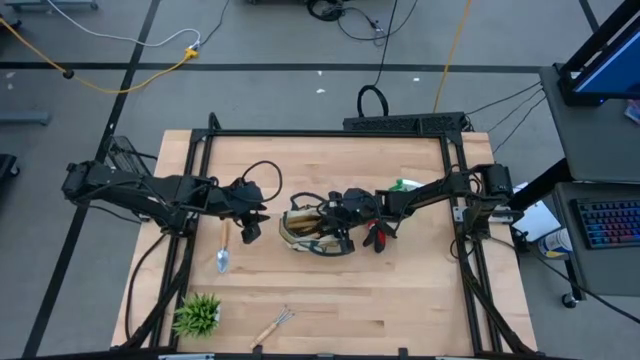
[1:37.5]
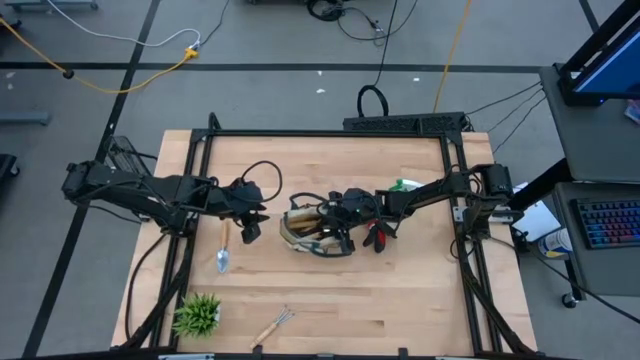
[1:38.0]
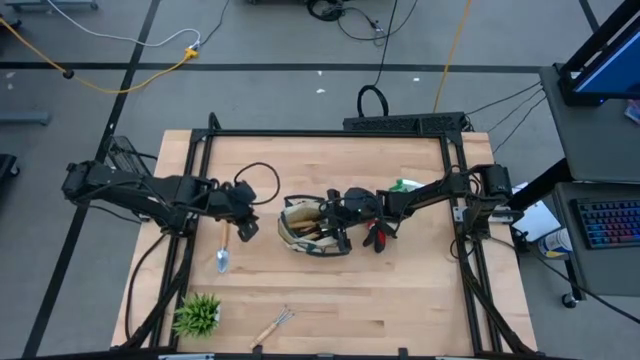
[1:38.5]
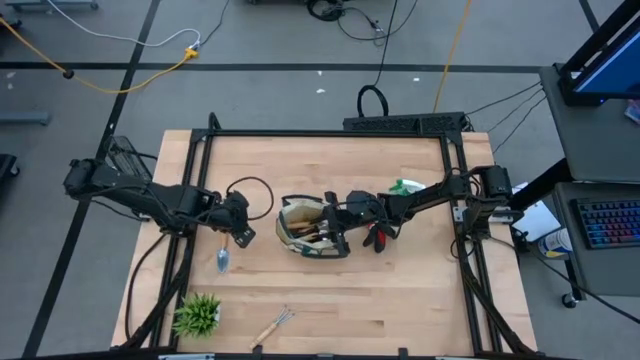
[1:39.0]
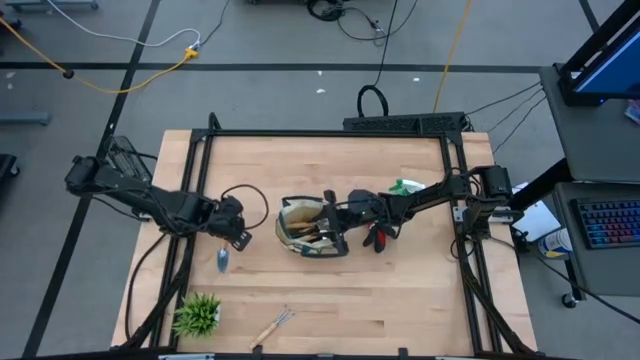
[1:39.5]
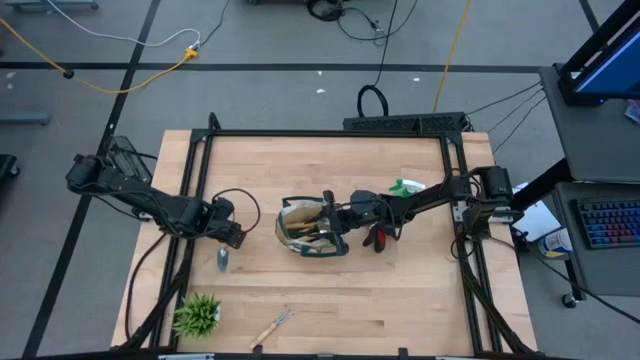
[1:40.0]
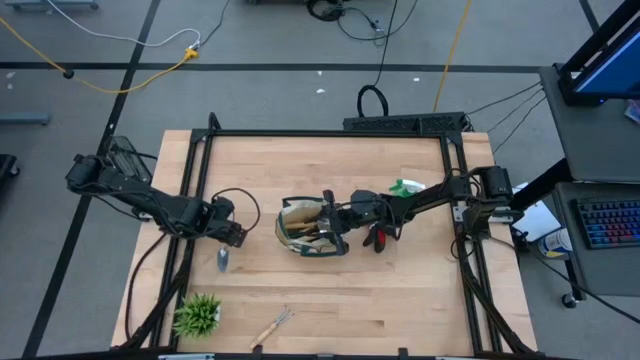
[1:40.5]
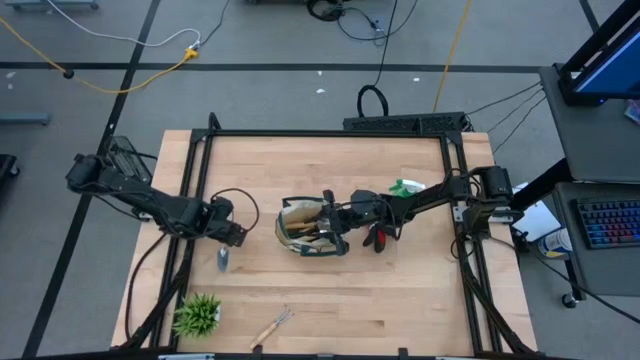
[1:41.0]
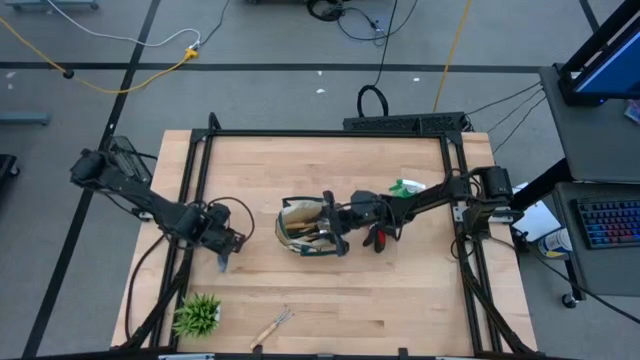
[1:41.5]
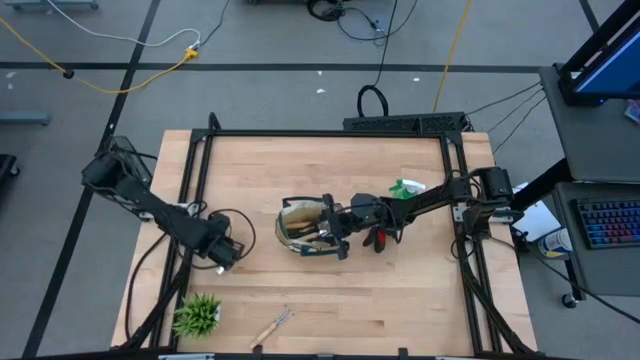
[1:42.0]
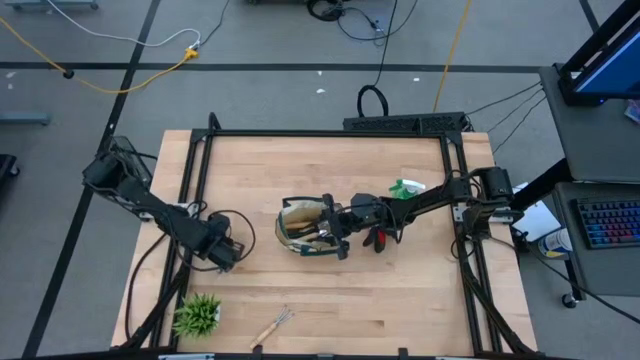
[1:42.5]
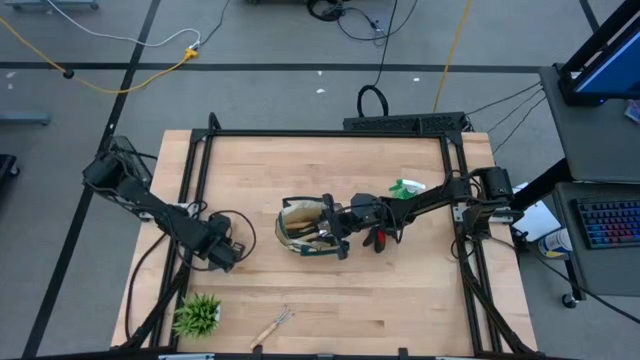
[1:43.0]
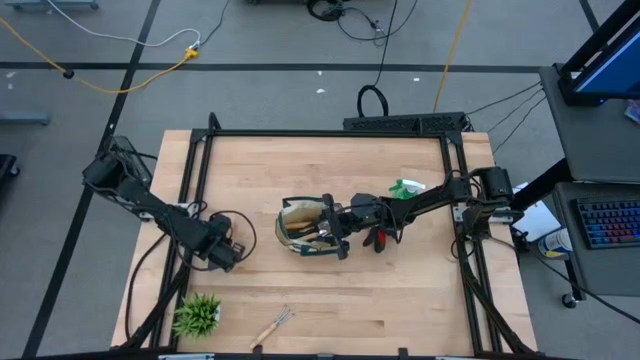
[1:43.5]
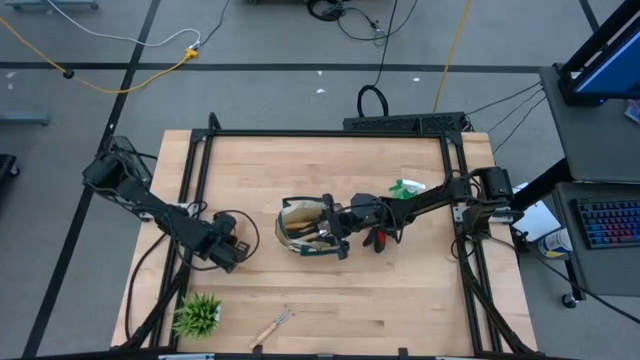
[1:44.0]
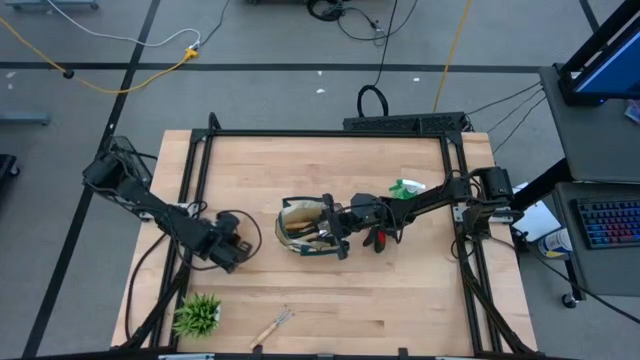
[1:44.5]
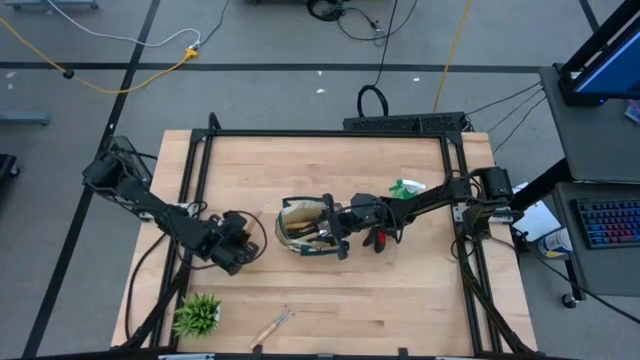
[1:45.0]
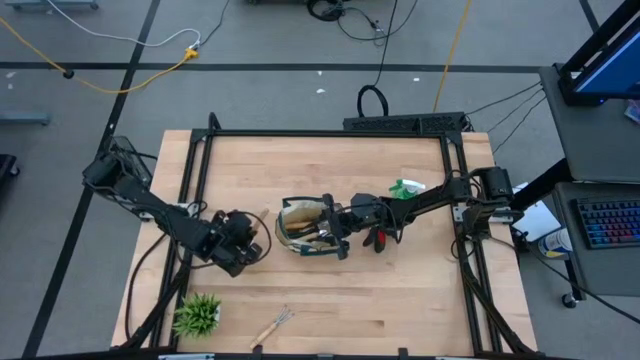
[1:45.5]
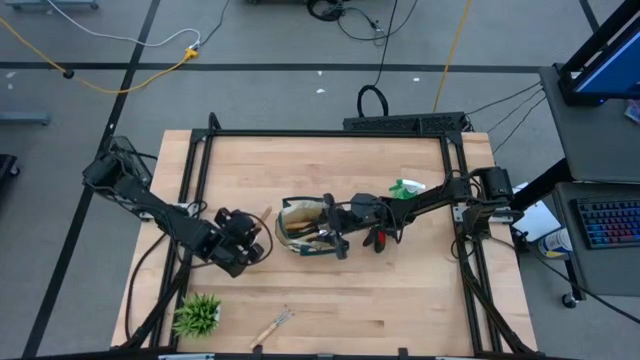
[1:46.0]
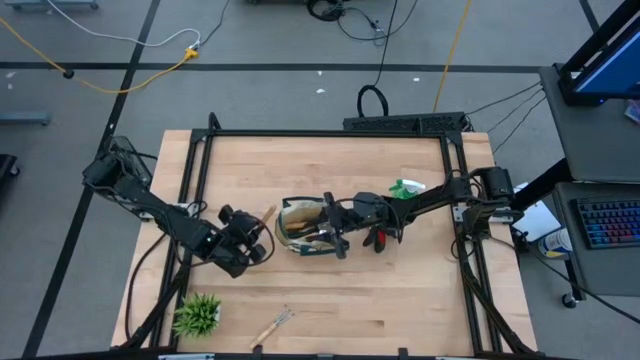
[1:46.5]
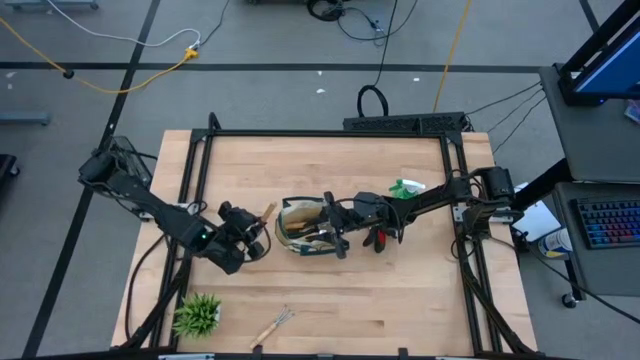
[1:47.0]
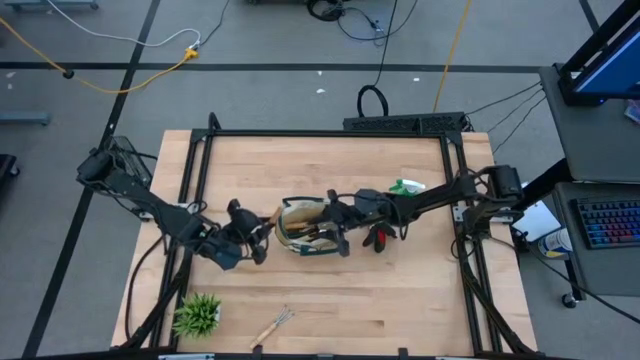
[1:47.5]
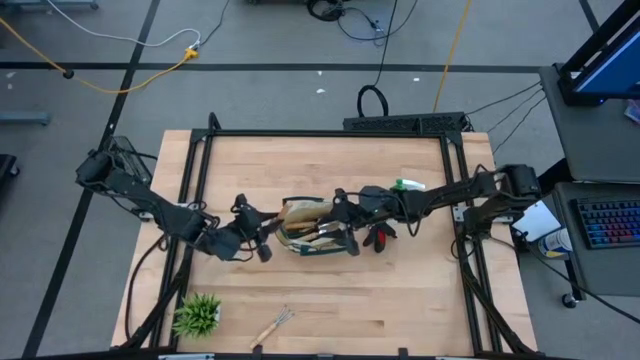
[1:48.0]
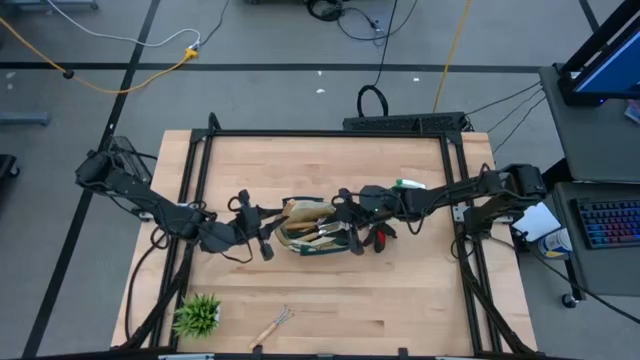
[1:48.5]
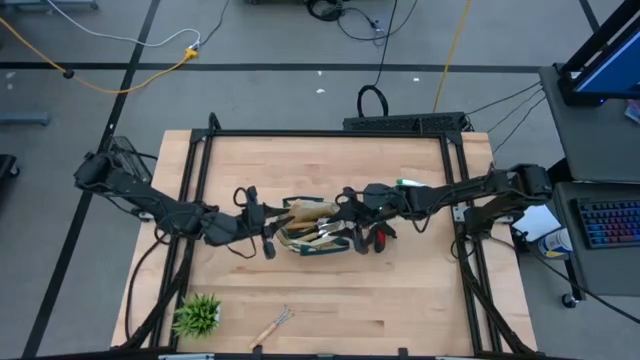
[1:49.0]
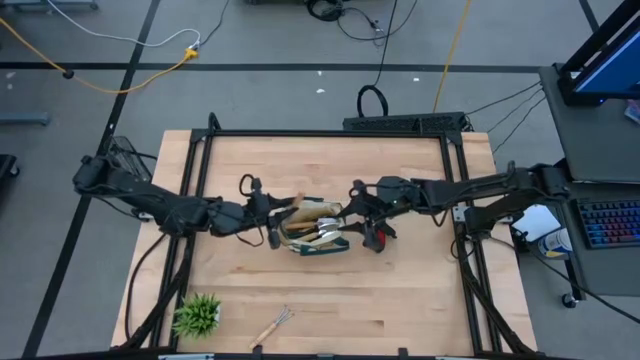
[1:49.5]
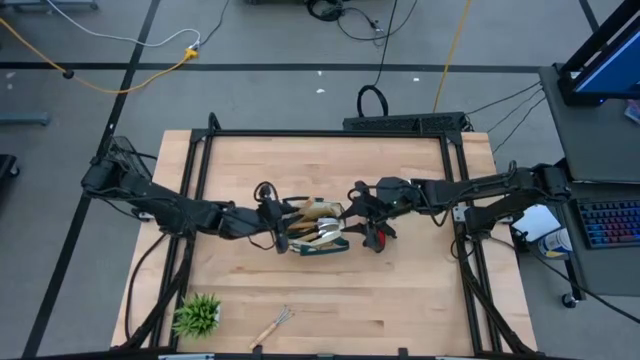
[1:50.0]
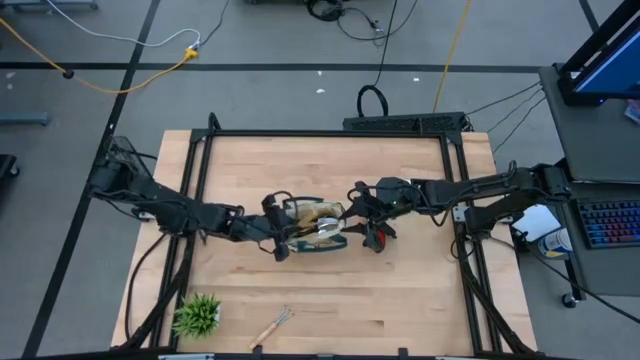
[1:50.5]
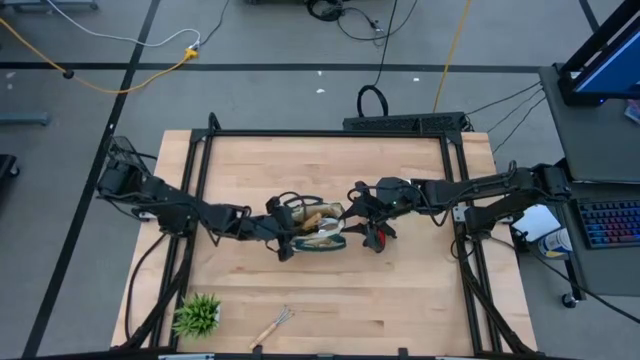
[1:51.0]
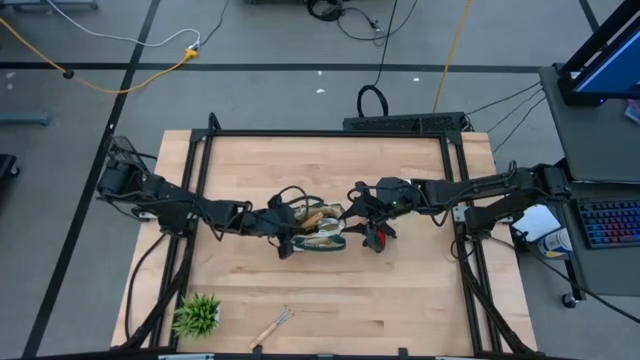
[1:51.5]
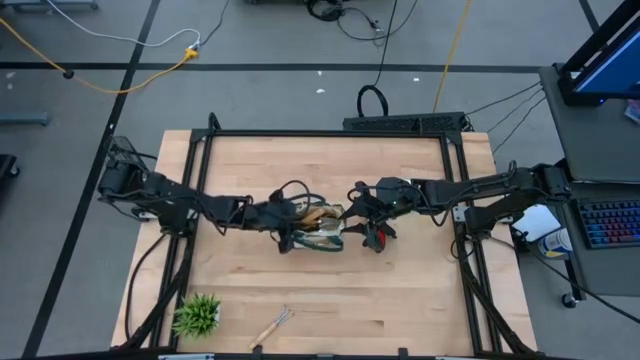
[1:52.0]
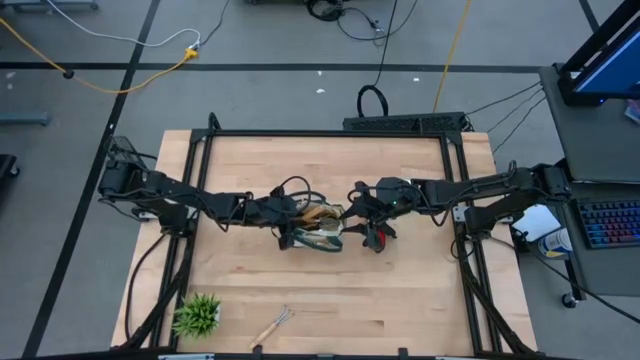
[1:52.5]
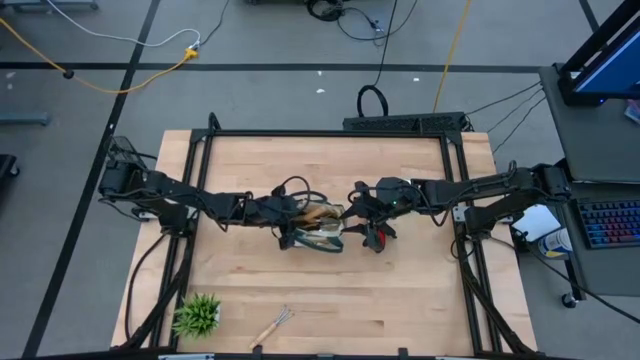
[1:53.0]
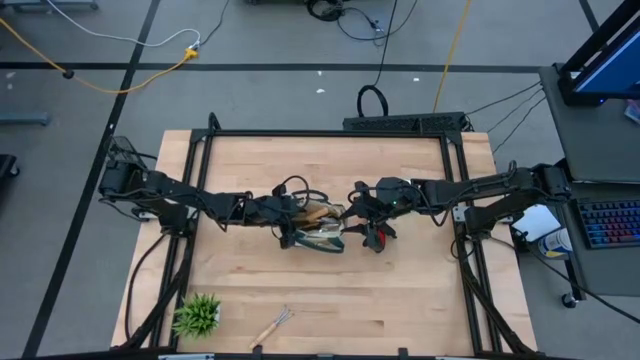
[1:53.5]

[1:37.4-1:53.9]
Task: Pick & Place Garden tools in Gardening bag
Put the brown trowel into the green gardening bag

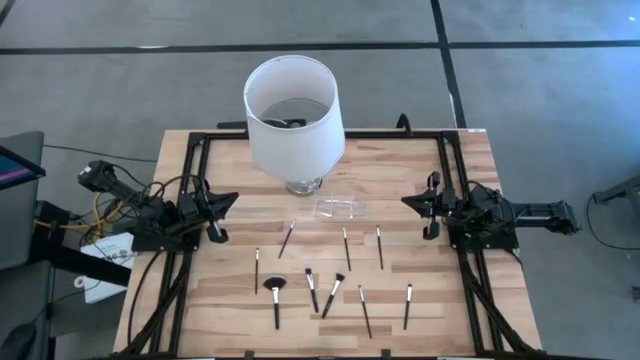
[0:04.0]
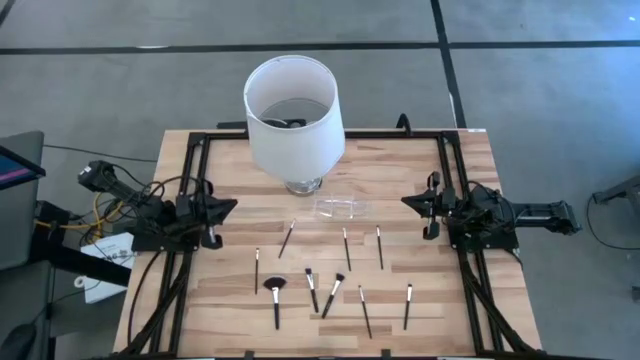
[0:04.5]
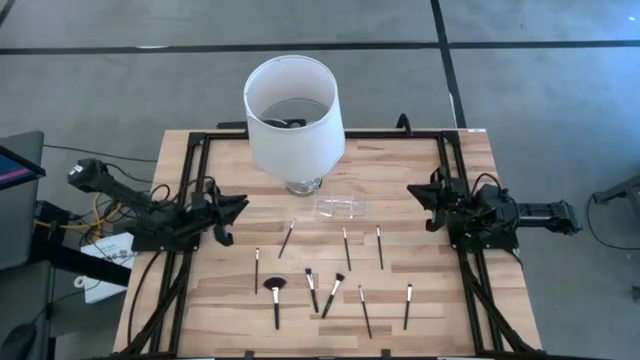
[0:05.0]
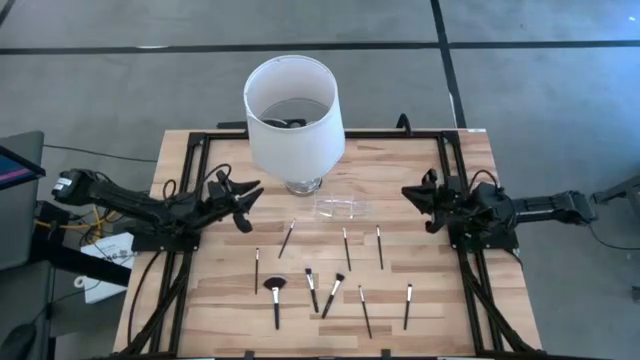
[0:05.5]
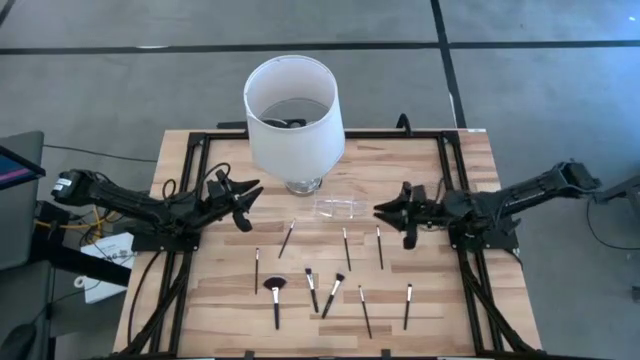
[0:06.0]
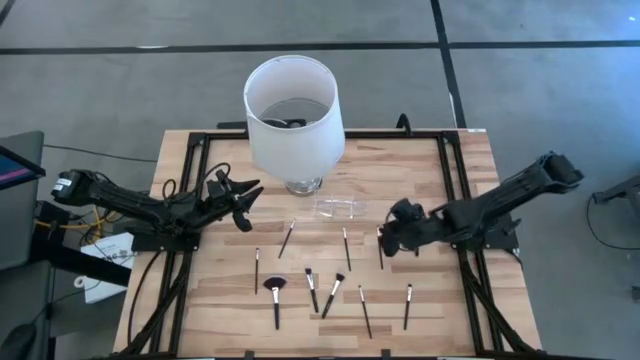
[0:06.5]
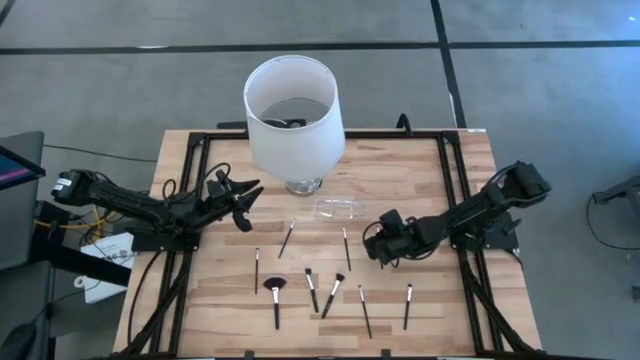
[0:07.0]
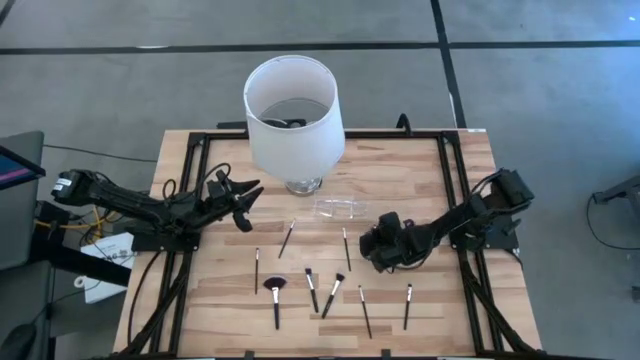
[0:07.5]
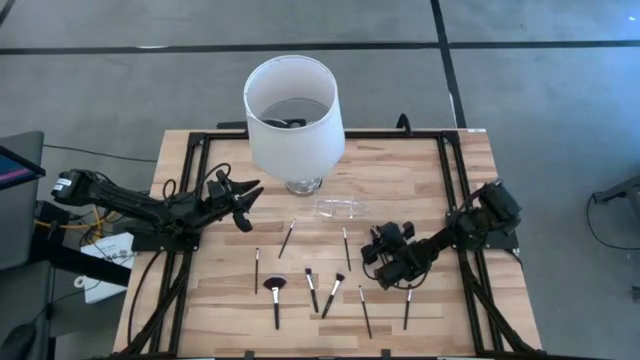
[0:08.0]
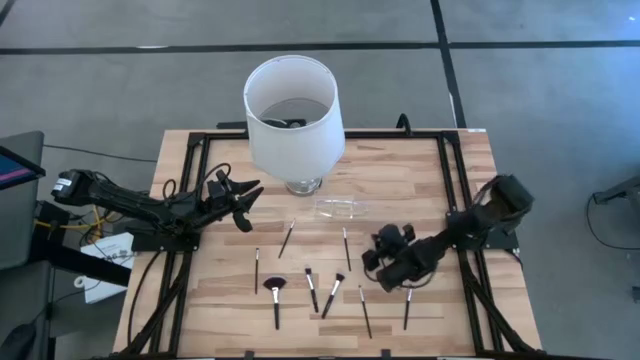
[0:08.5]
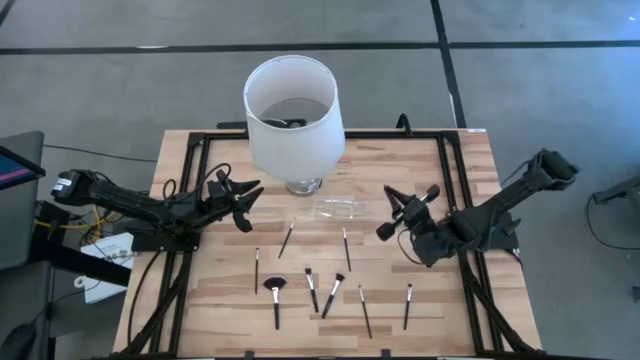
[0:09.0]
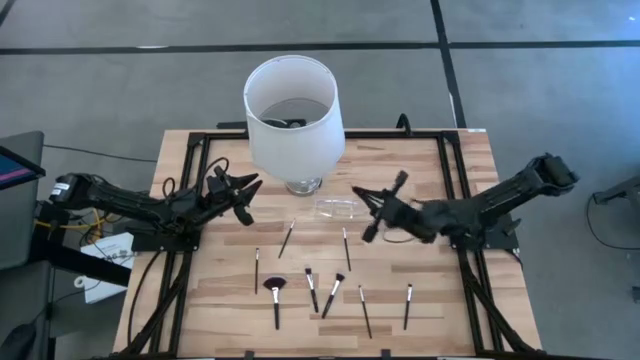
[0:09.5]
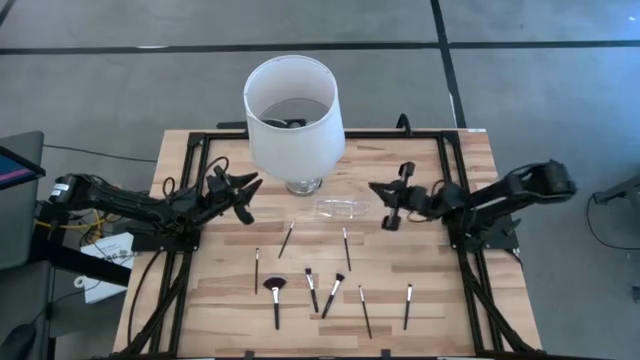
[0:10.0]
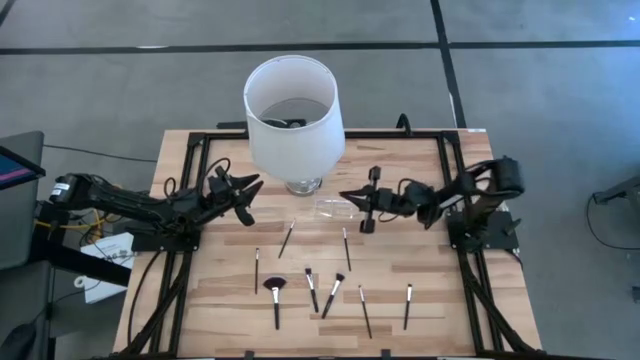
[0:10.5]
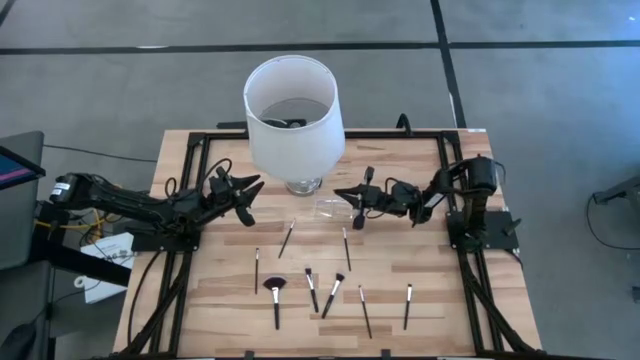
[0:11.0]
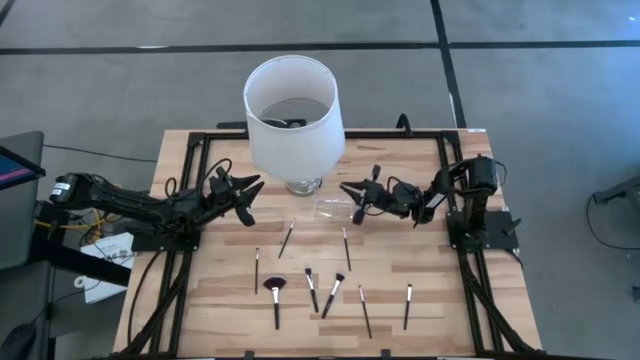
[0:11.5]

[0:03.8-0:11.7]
Task: Put items in baskets/containers
Put the black eyeshadow brush into the transparent organizer
